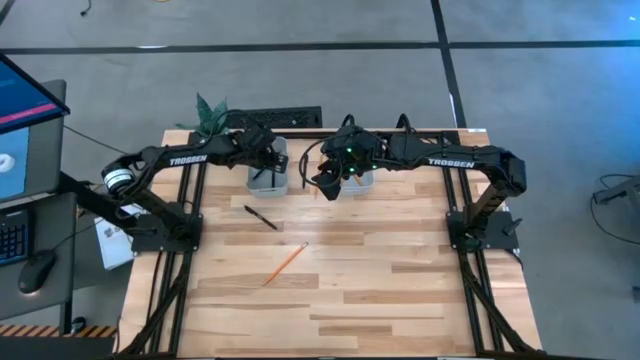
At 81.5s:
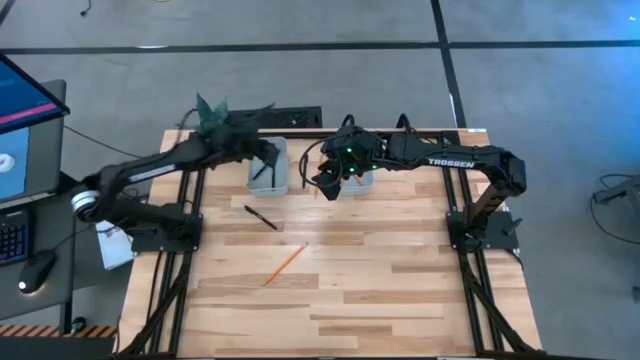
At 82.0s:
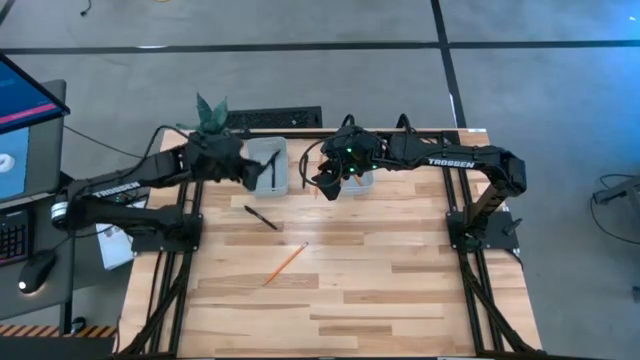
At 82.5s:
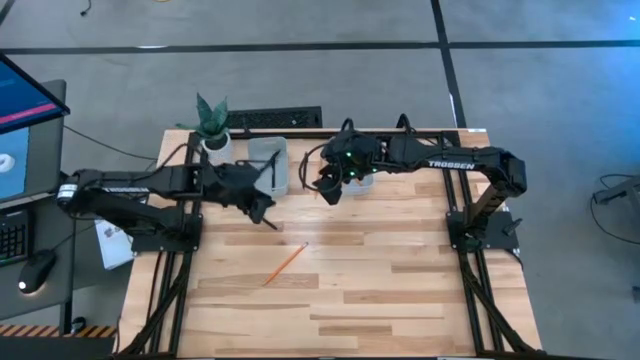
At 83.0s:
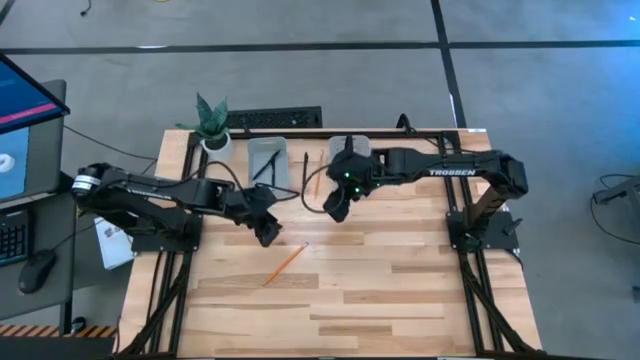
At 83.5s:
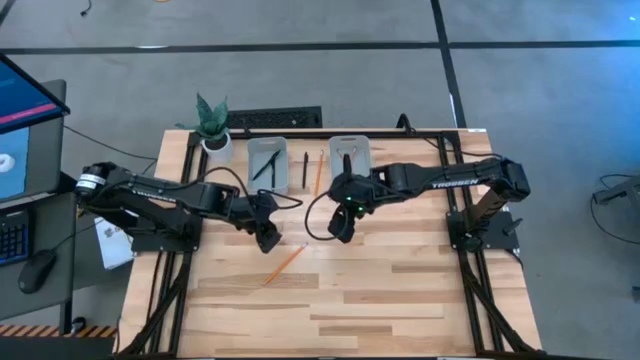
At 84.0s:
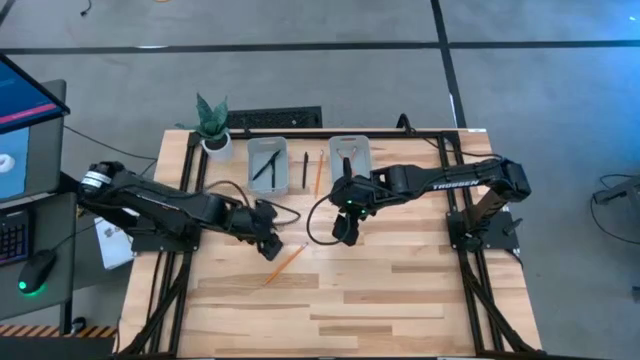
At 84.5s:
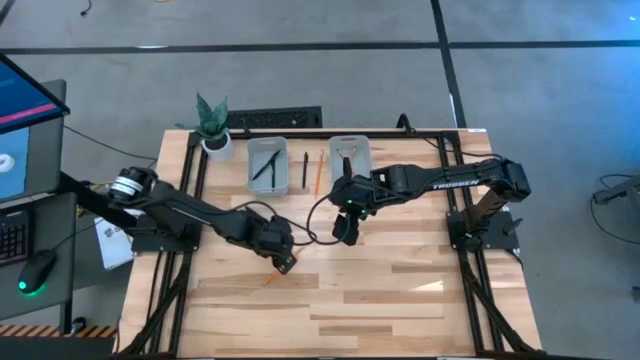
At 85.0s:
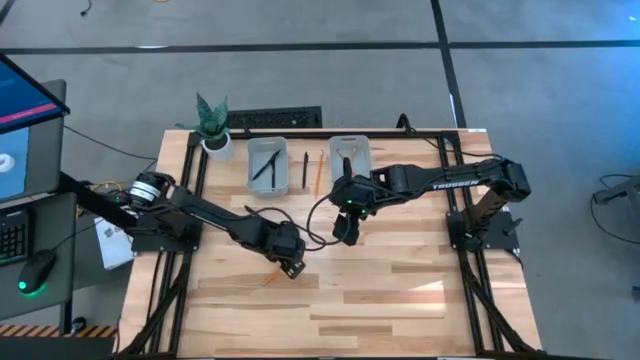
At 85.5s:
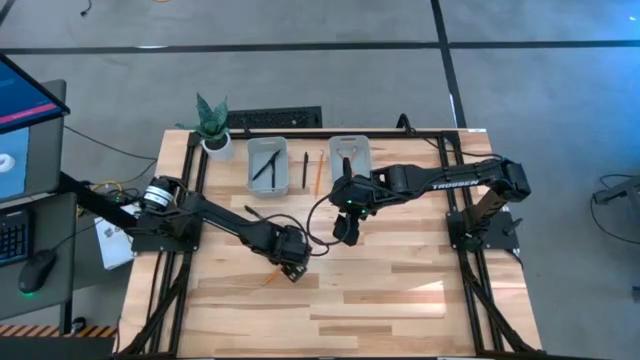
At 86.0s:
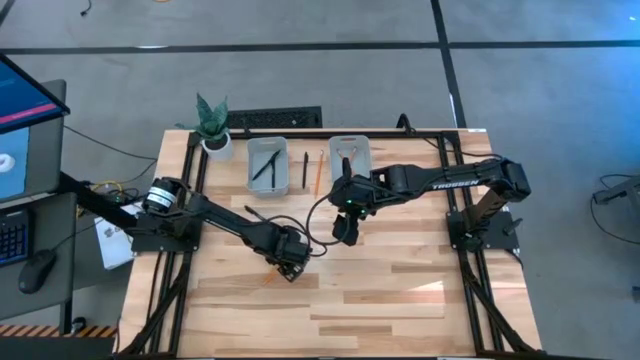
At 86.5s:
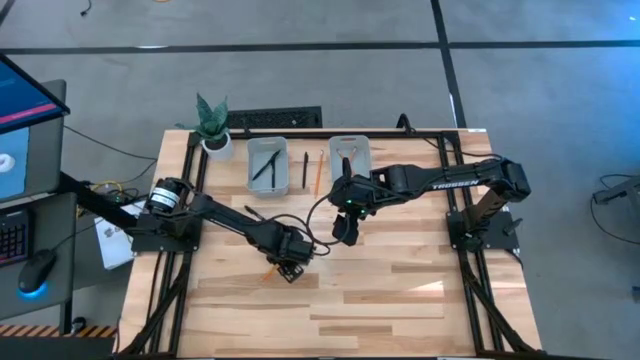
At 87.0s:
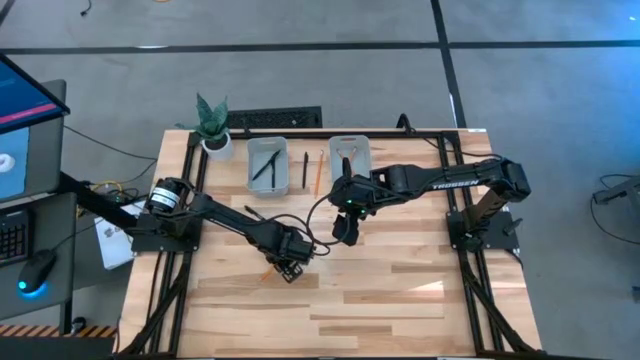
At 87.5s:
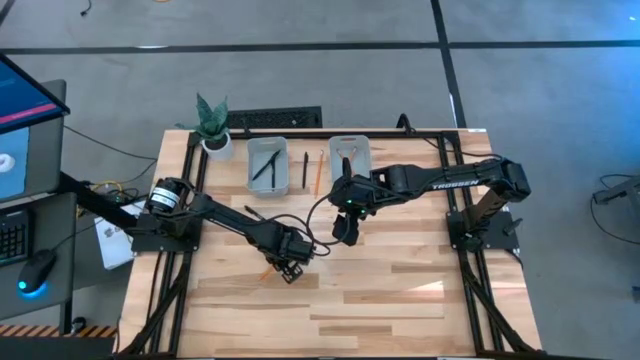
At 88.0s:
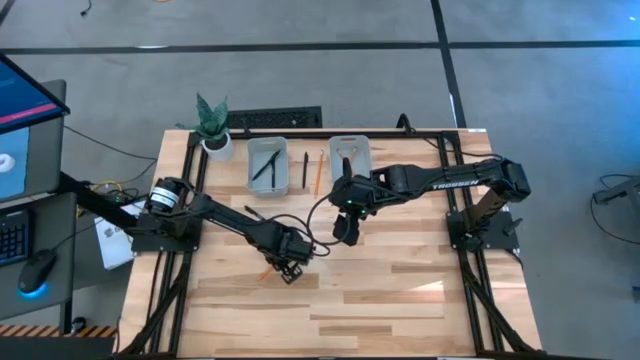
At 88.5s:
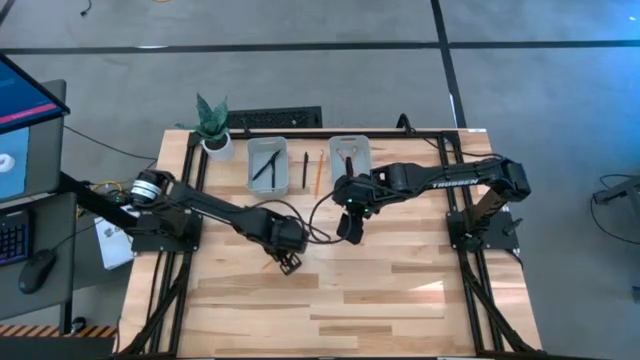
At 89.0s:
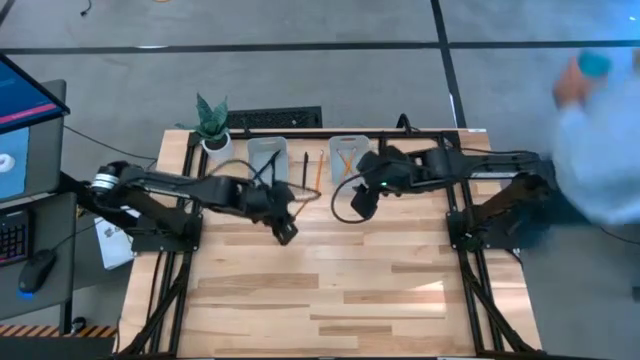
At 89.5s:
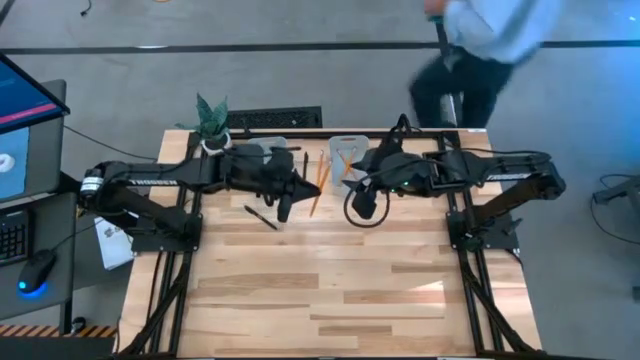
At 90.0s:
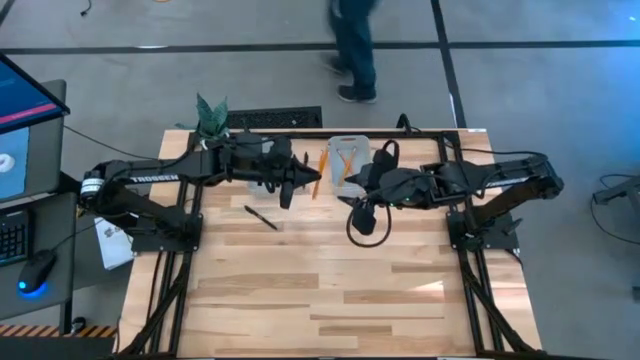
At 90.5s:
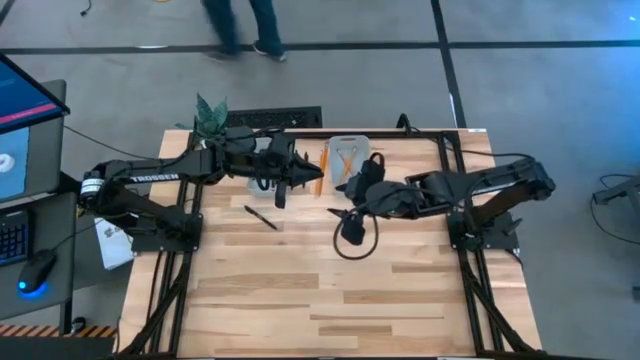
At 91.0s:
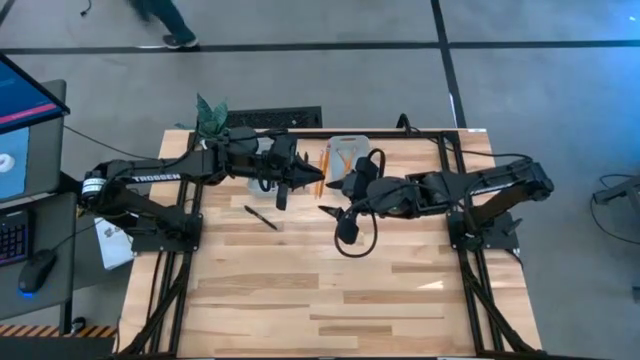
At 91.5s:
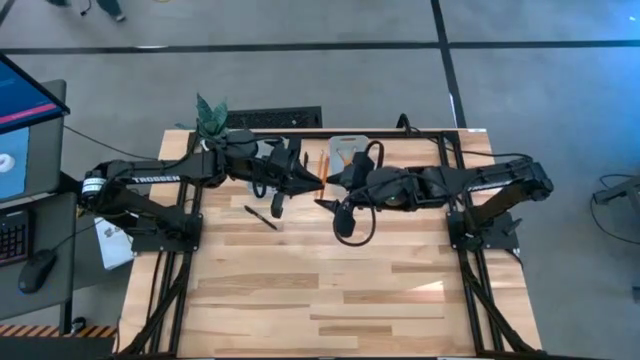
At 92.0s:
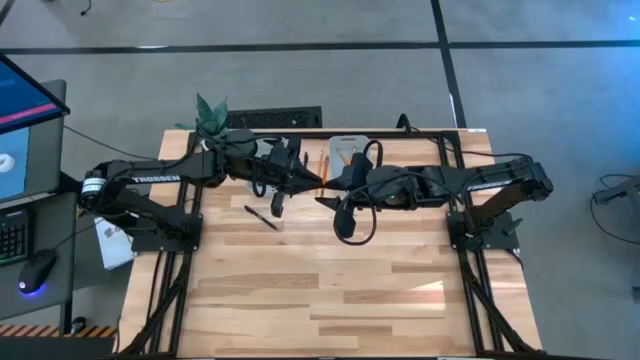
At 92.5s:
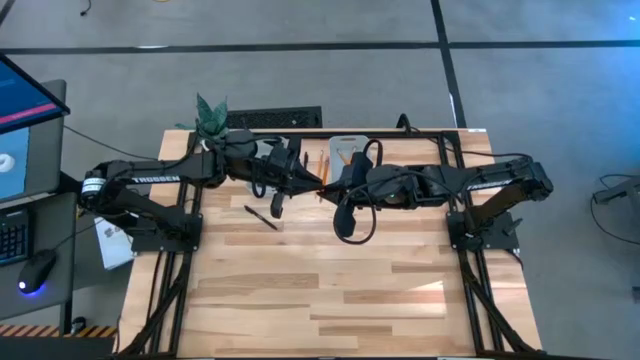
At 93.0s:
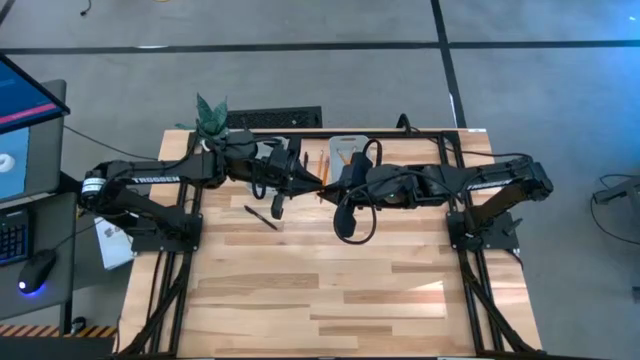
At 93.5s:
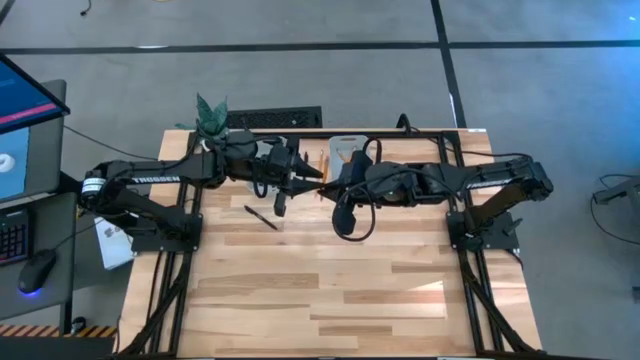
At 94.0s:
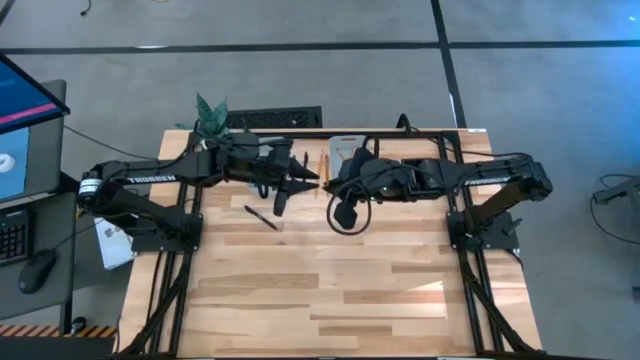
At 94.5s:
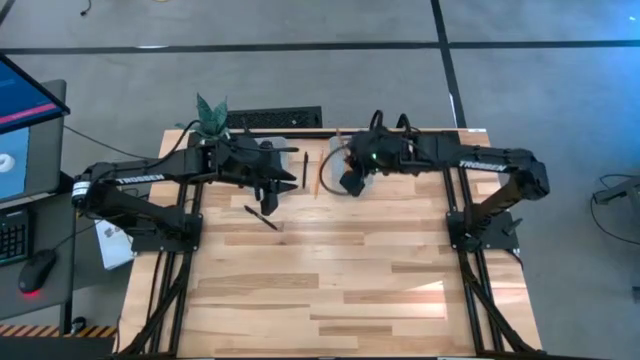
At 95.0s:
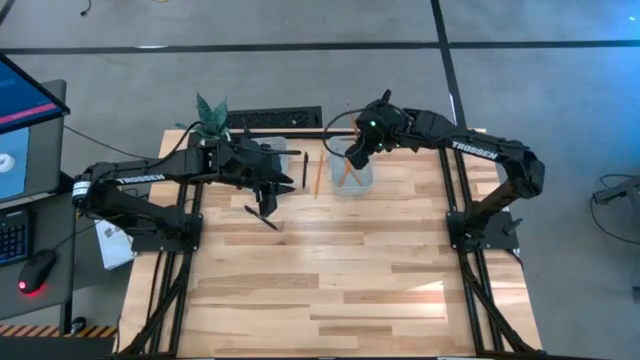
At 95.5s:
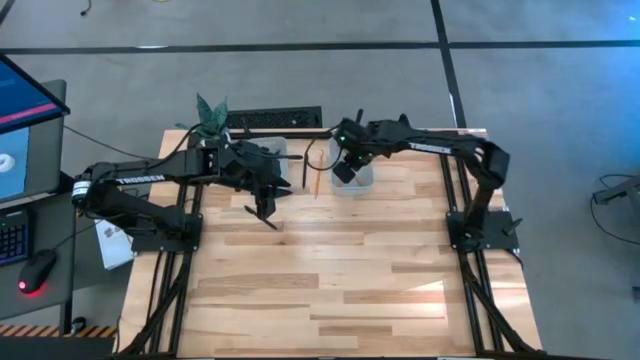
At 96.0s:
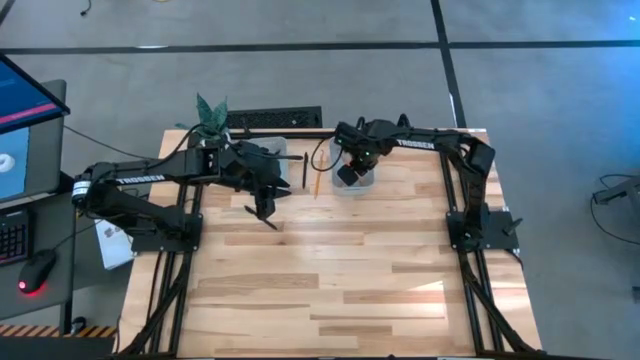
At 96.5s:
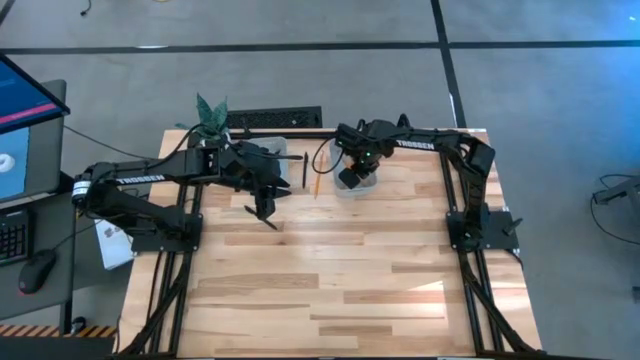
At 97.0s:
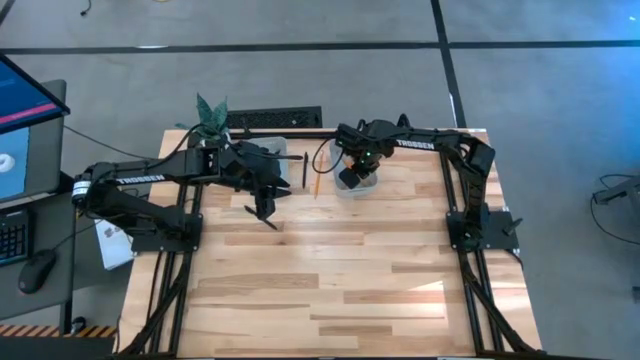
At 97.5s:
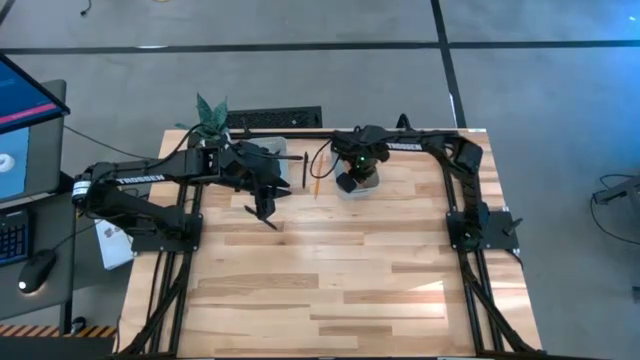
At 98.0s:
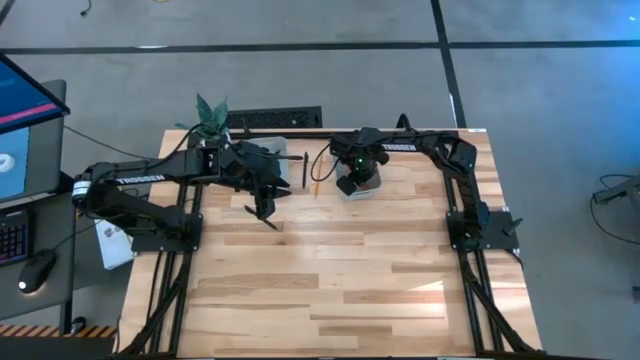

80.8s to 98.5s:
Task: Sort pens & pencils
Put the orange pencil into the right gray bin

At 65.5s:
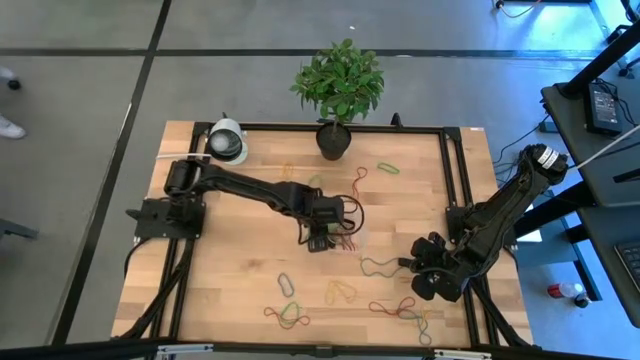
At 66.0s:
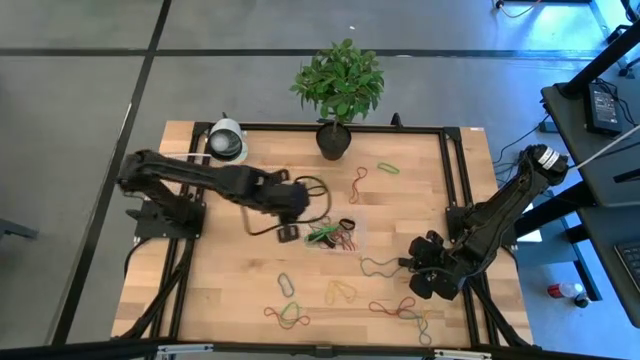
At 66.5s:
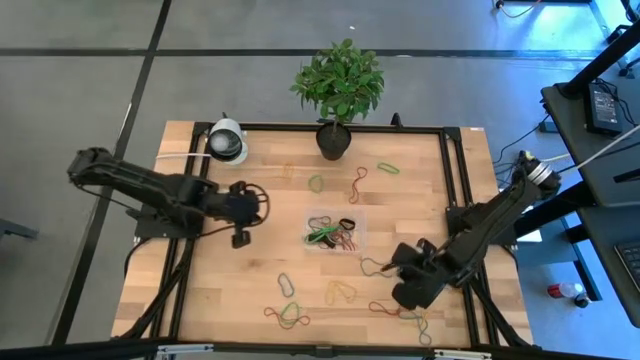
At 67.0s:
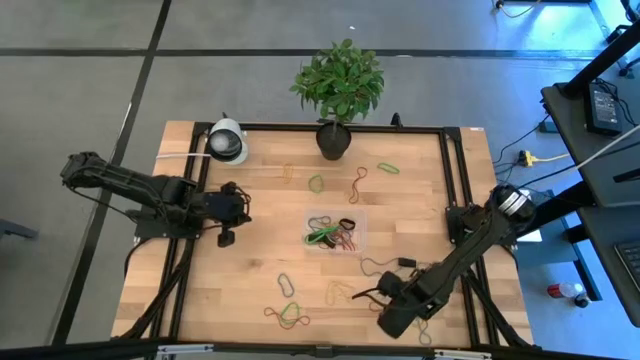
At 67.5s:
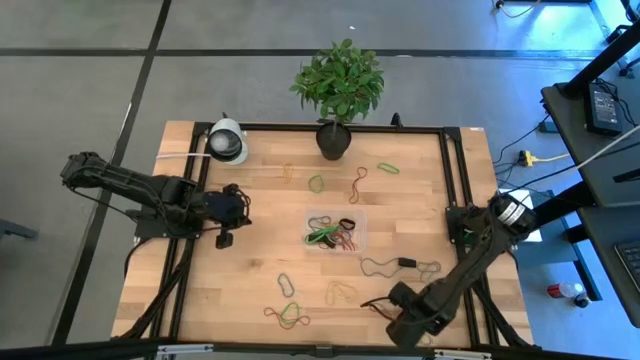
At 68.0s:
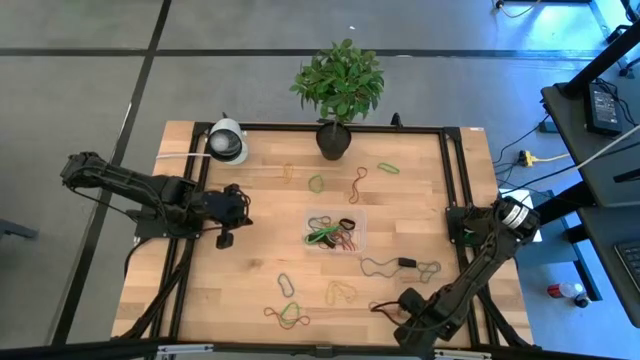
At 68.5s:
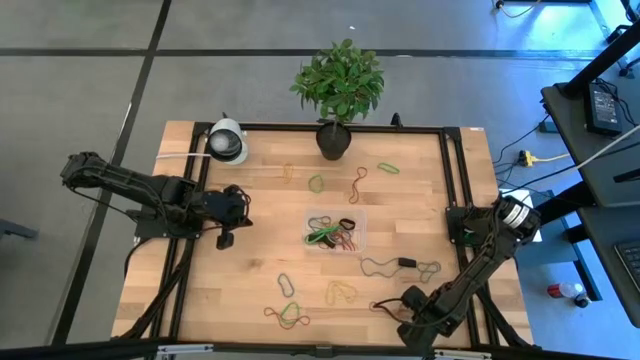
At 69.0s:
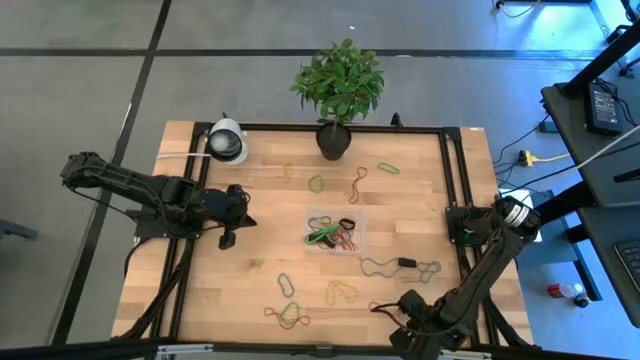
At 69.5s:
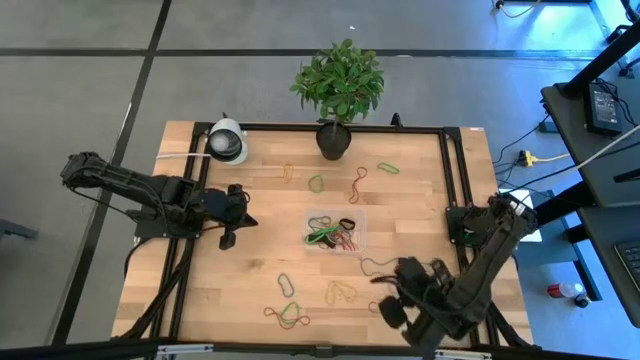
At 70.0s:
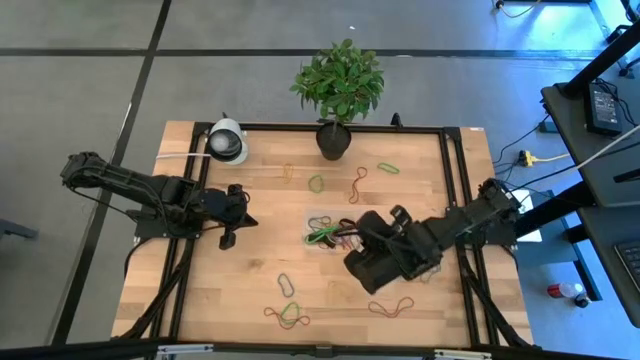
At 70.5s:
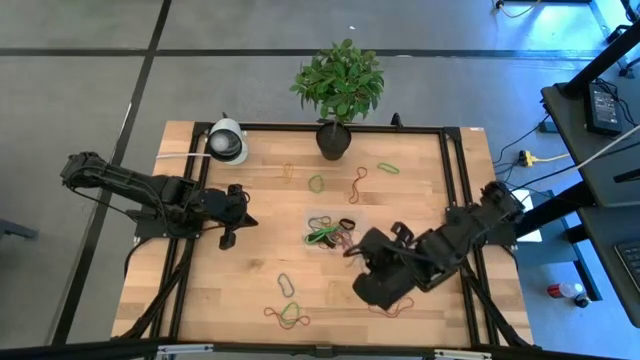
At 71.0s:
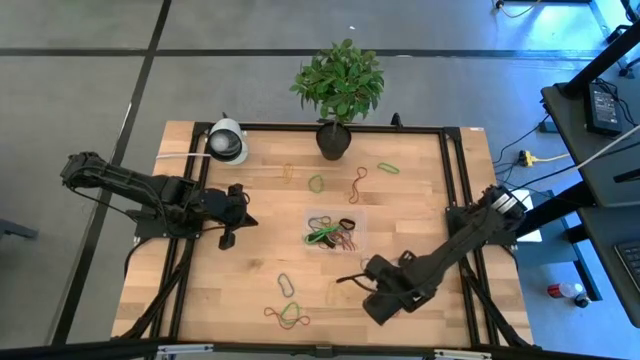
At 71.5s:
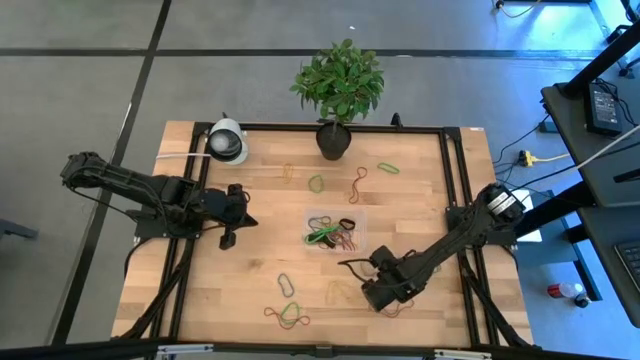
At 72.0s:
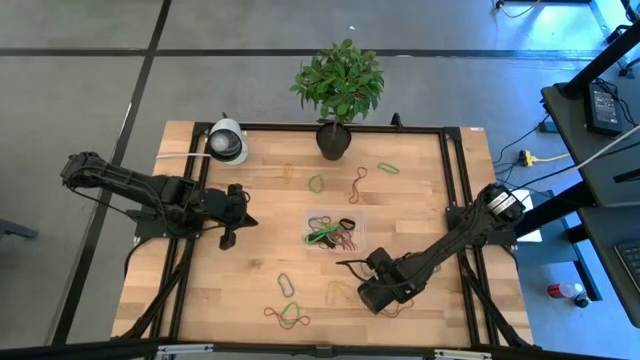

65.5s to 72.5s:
Task: Pick and place rubber bands into bin
Put the blue rubber band into the bin
